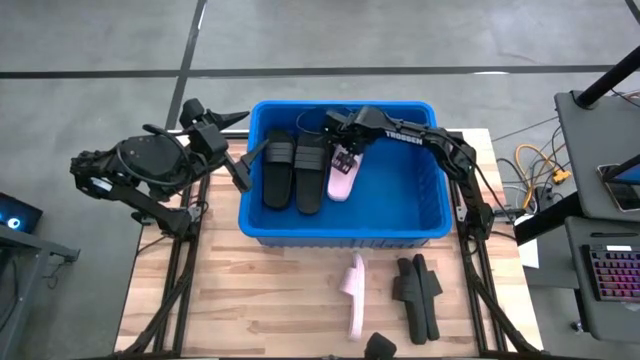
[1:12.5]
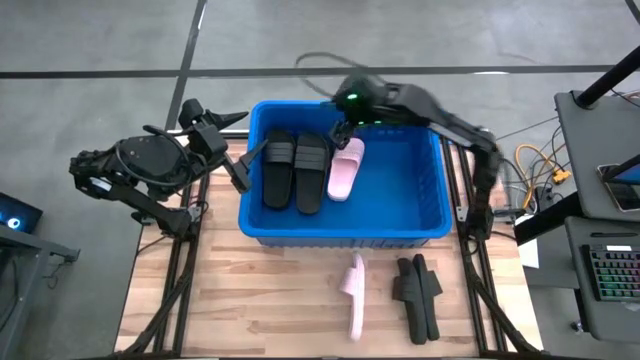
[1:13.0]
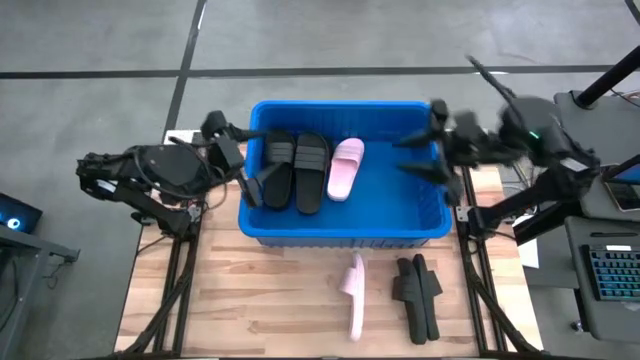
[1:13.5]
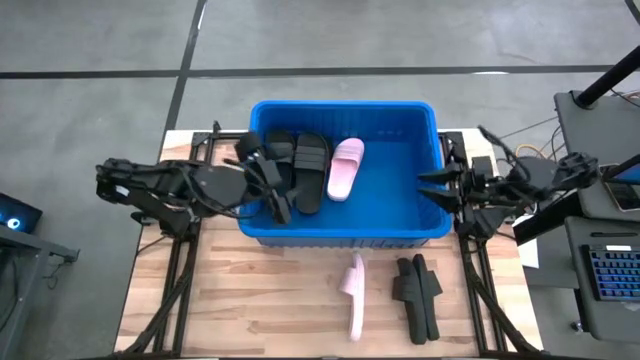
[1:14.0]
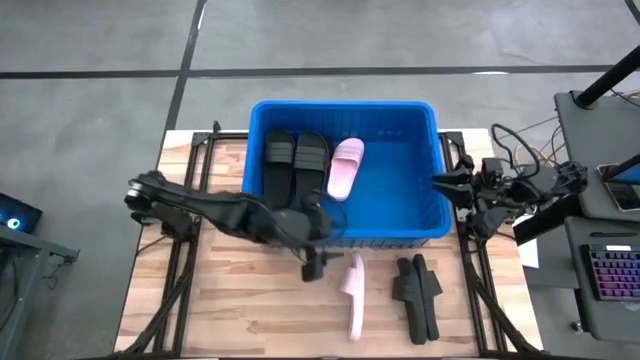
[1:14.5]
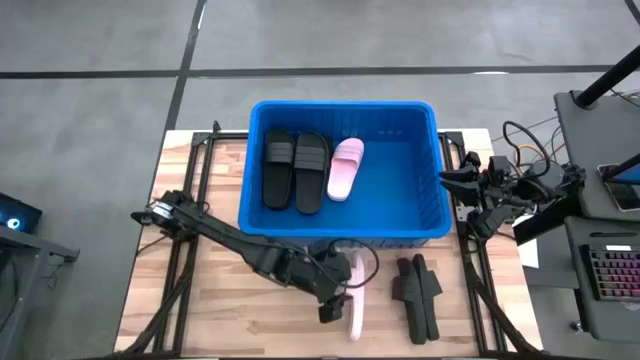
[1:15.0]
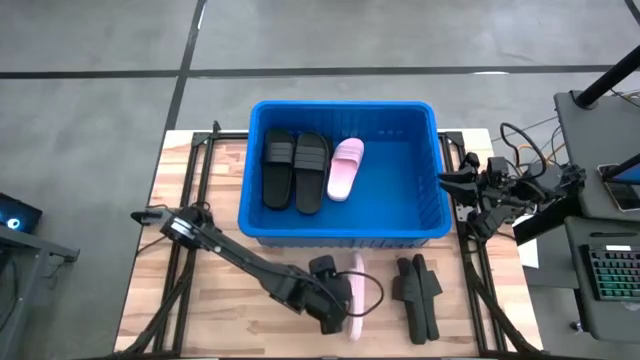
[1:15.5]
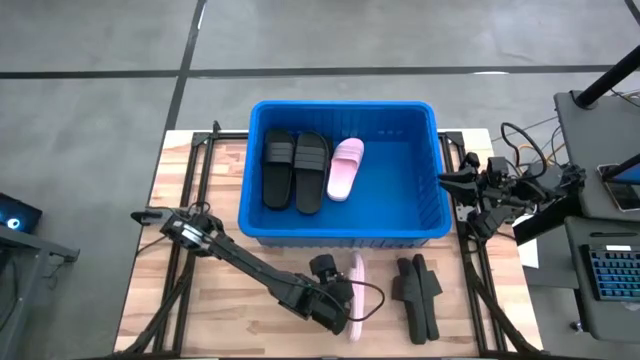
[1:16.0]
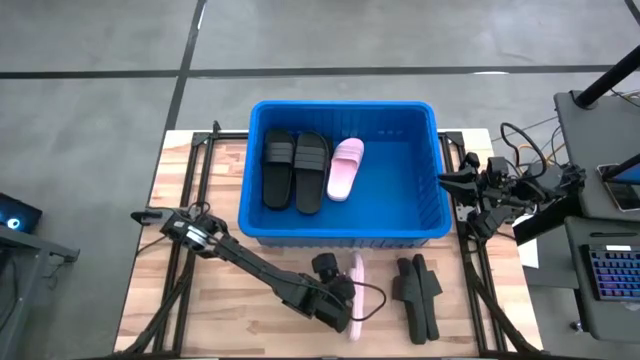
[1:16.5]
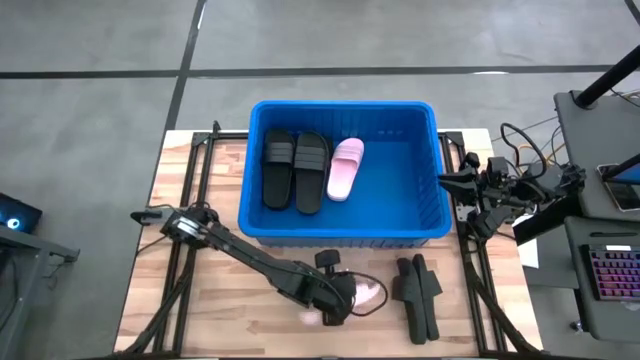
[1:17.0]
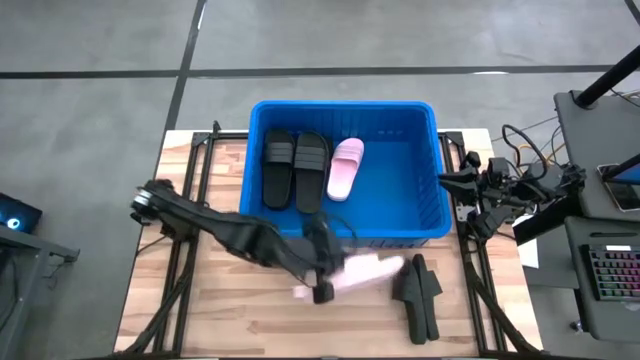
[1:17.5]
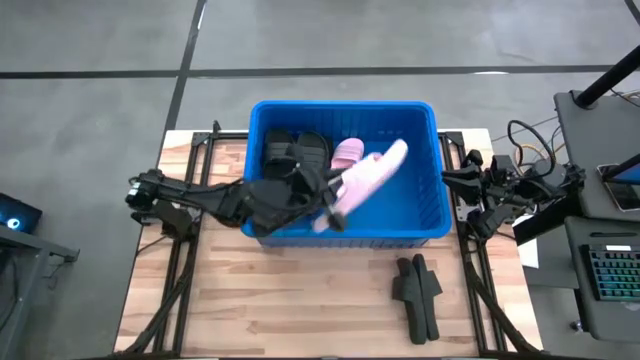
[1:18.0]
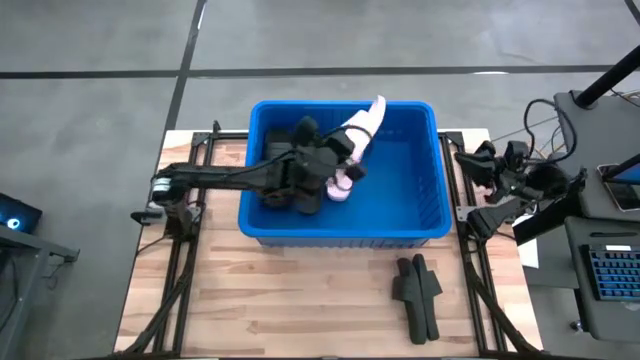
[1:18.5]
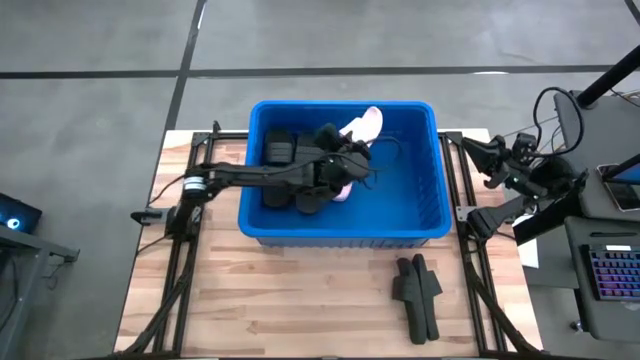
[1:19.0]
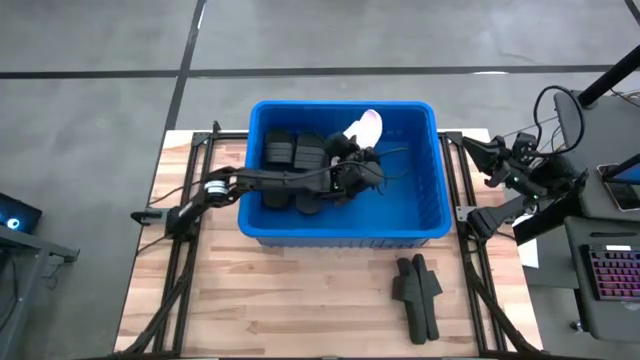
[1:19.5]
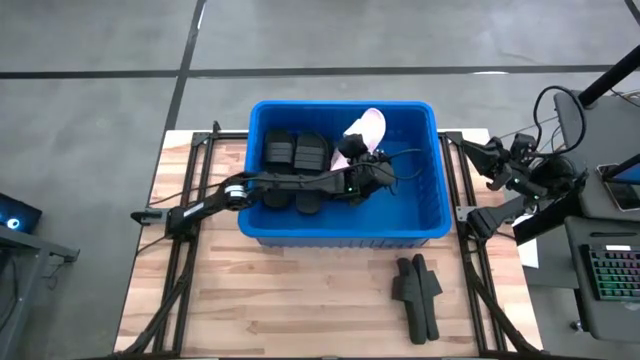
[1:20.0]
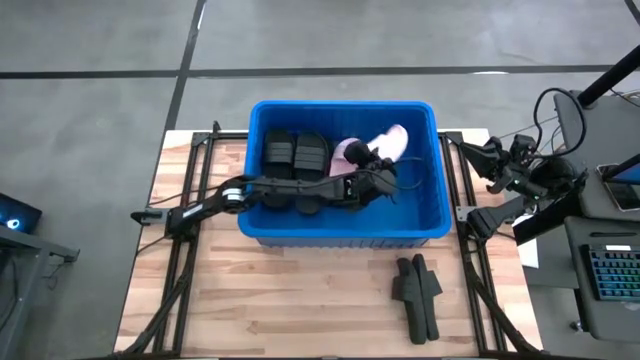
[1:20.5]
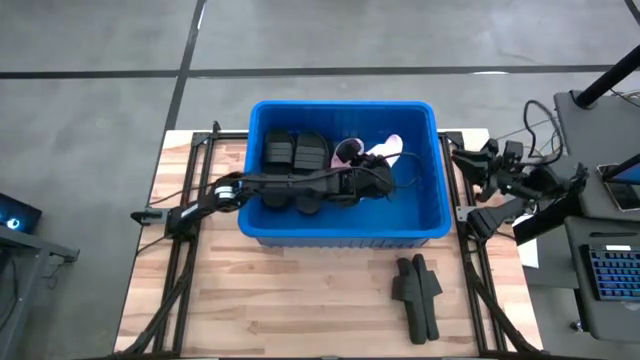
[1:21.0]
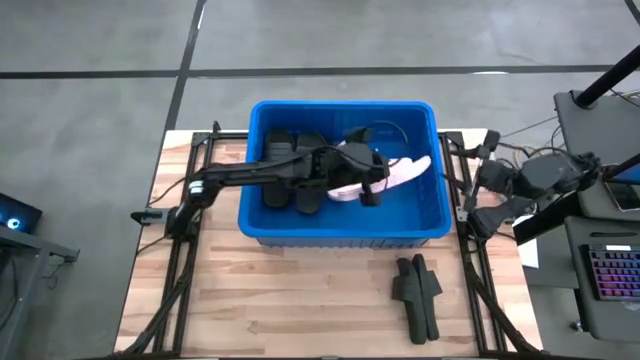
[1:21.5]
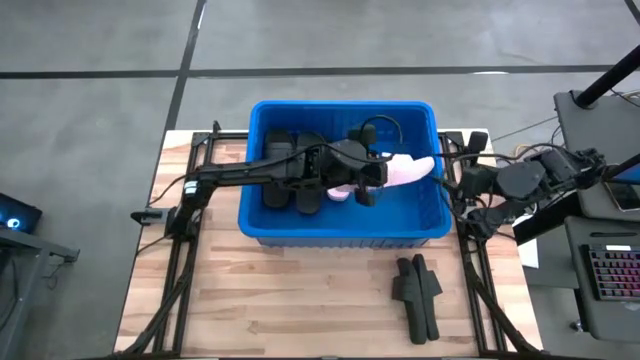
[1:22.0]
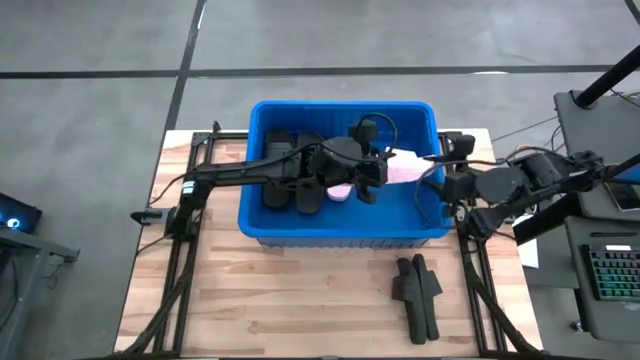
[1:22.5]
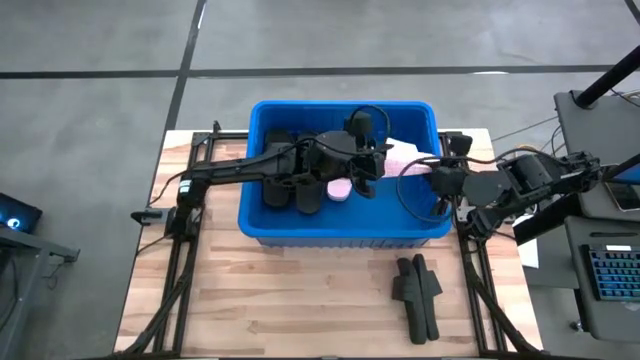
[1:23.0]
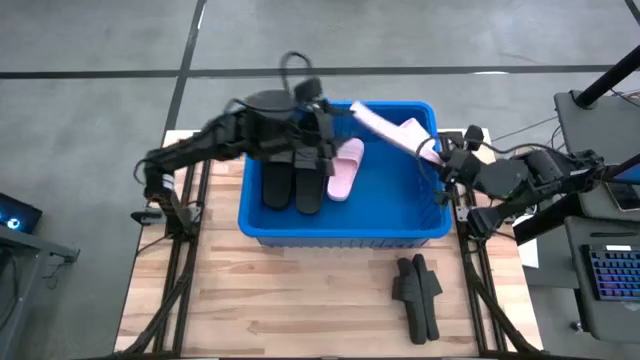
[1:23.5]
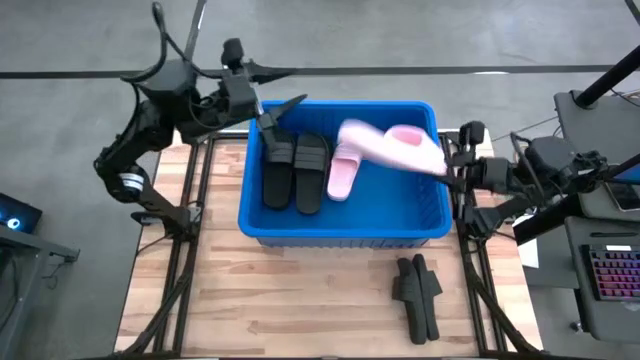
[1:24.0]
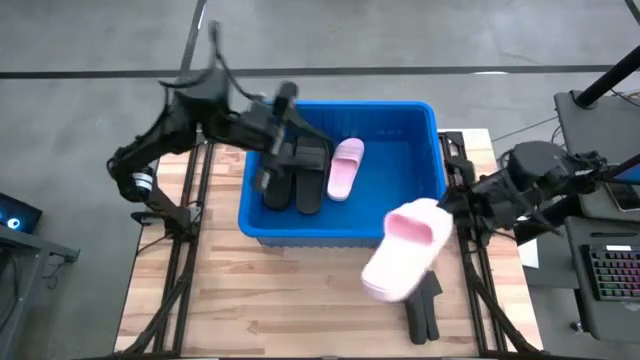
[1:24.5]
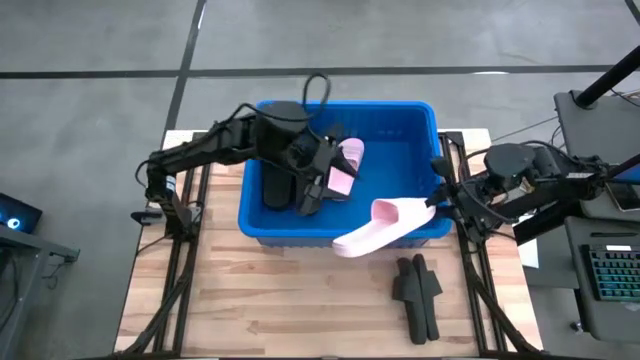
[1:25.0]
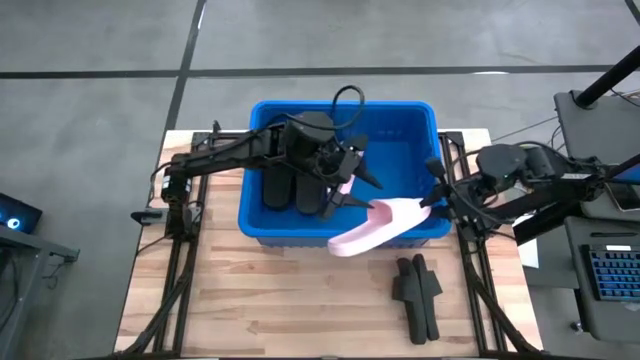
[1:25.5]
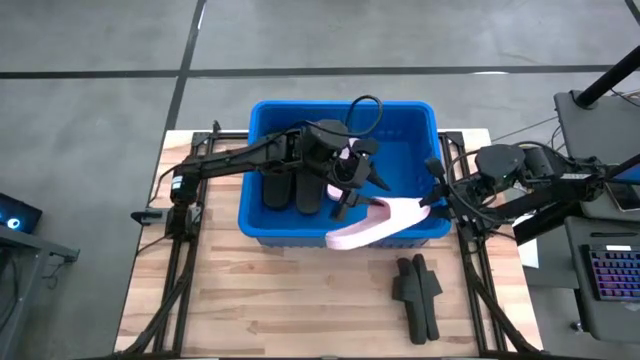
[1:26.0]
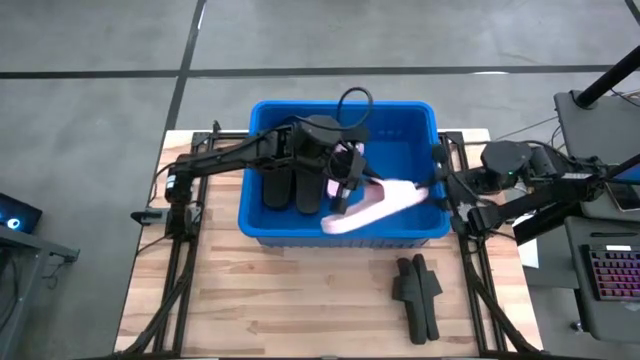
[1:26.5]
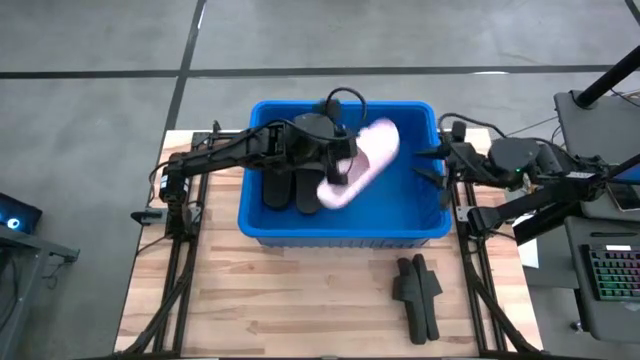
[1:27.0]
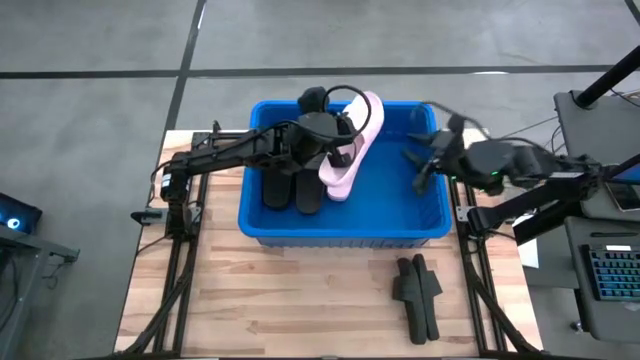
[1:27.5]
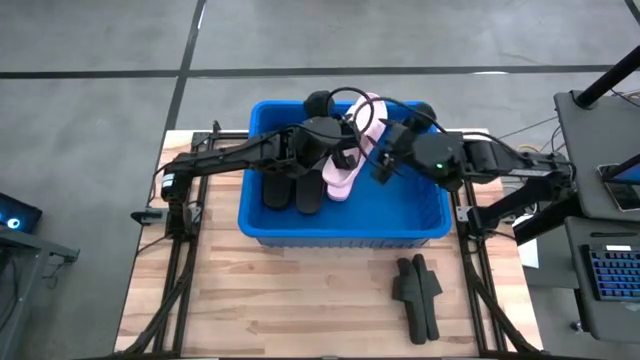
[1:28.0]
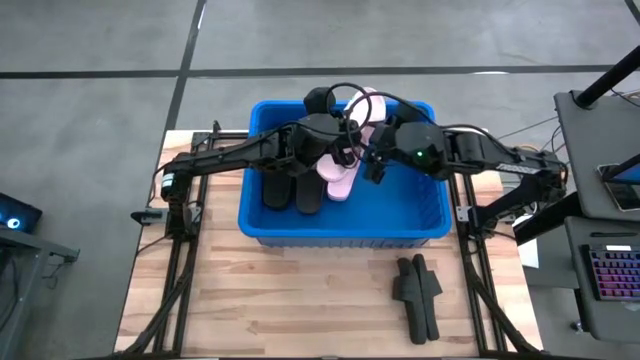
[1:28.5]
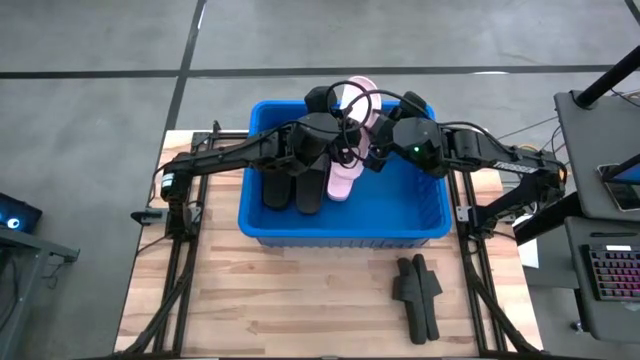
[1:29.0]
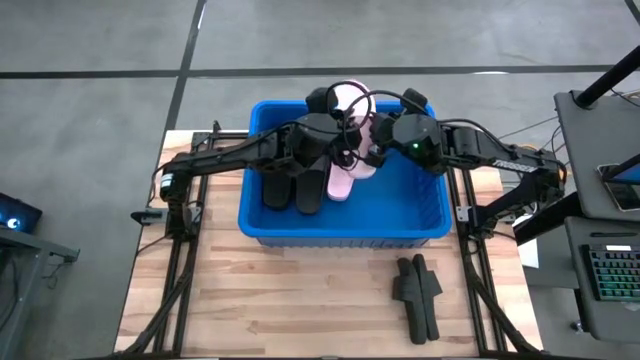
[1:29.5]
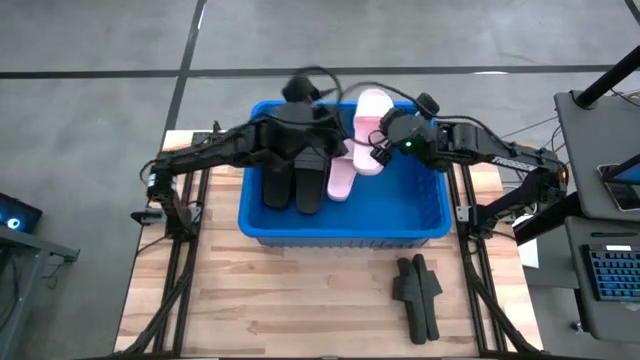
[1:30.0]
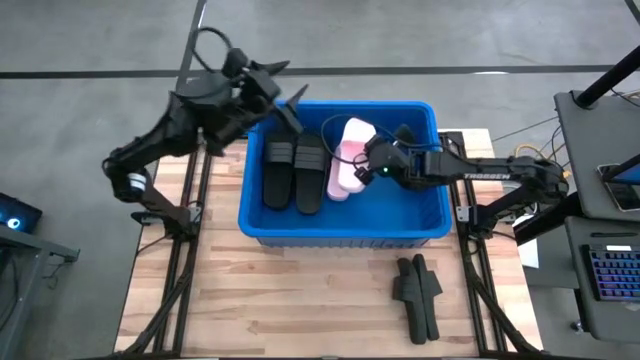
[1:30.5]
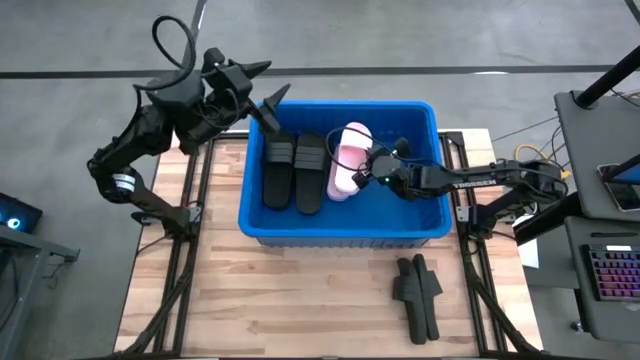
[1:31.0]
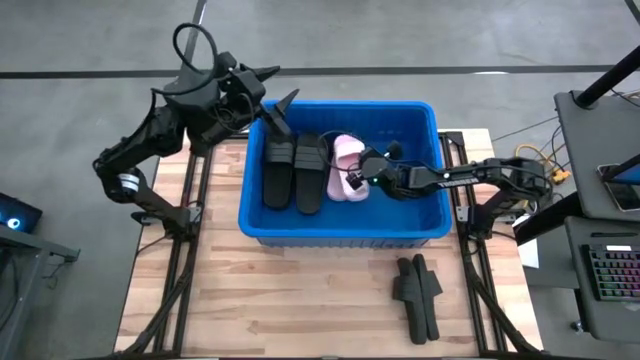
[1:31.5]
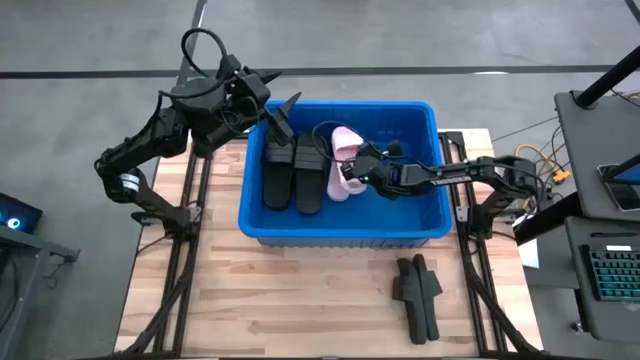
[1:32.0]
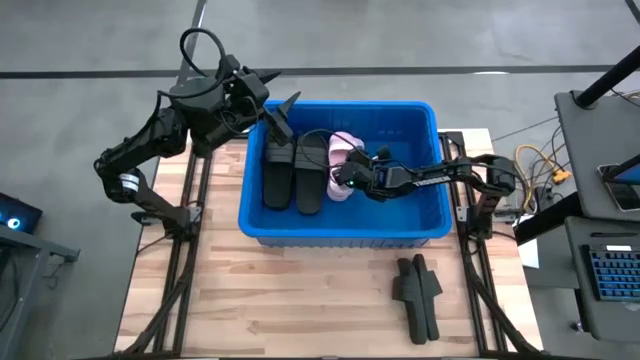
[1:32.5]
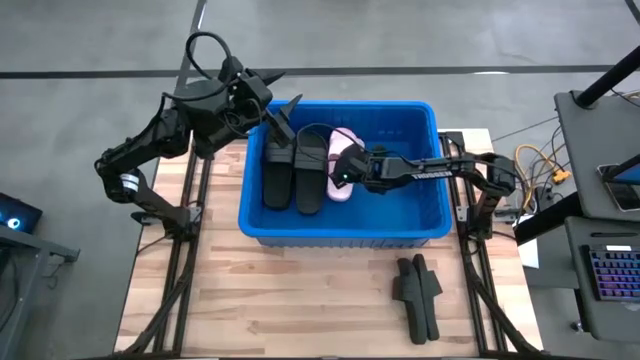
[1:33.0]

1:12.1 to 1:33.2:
Task: Pick and place slides into bin
Put the pink slides into the blue bin
